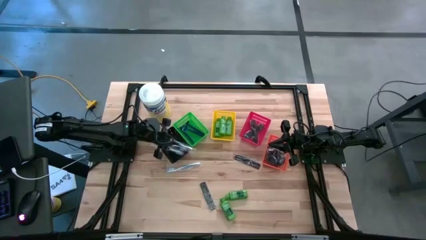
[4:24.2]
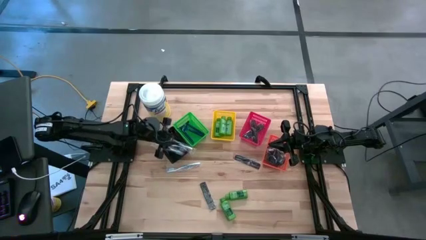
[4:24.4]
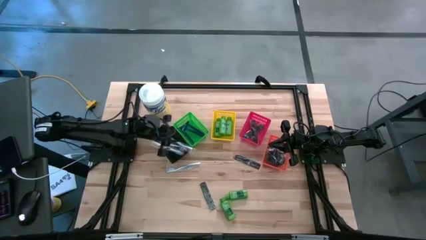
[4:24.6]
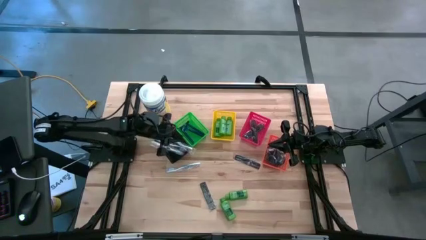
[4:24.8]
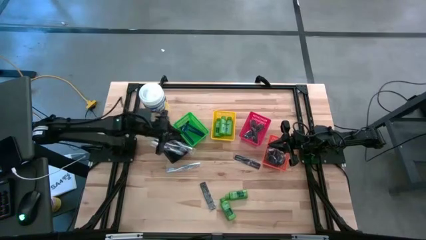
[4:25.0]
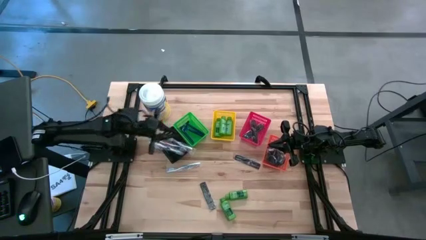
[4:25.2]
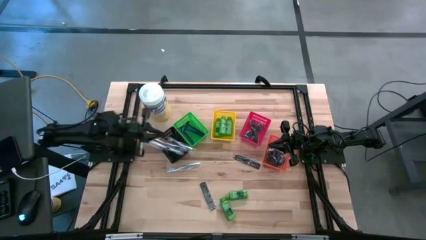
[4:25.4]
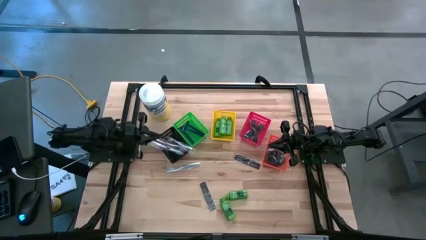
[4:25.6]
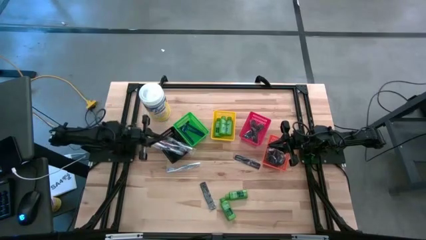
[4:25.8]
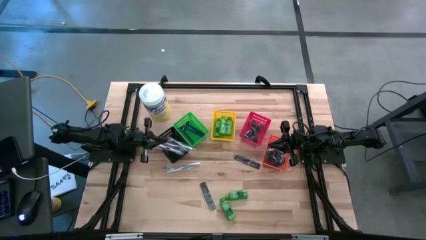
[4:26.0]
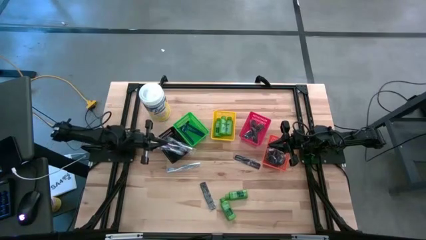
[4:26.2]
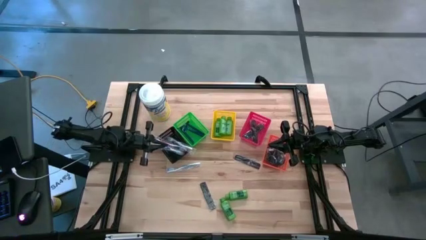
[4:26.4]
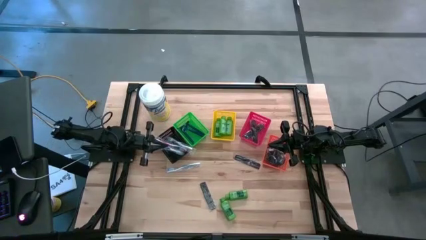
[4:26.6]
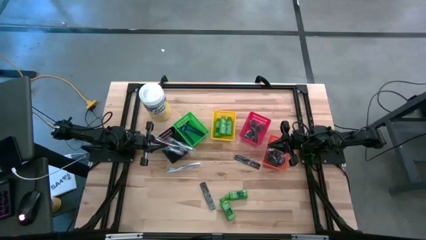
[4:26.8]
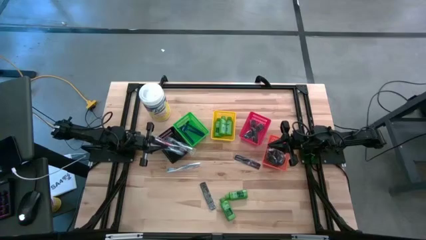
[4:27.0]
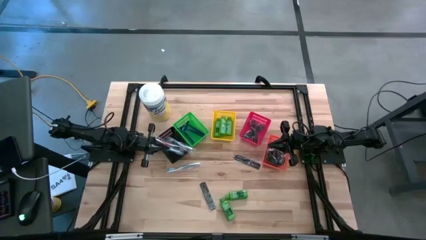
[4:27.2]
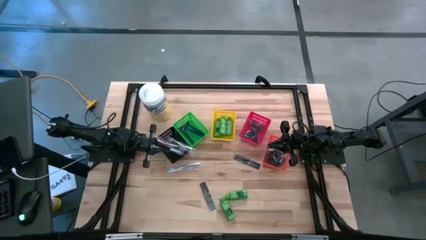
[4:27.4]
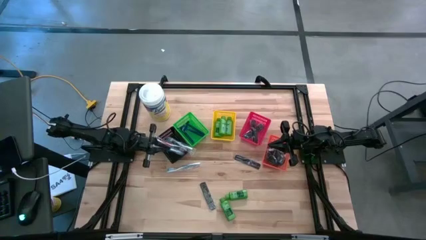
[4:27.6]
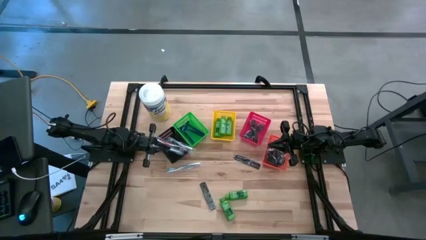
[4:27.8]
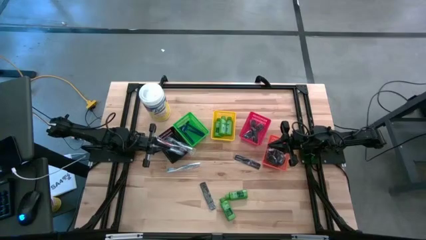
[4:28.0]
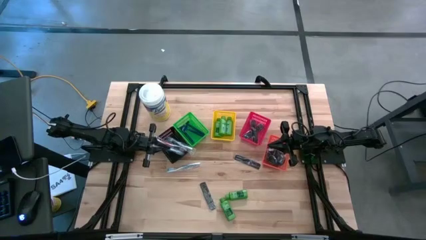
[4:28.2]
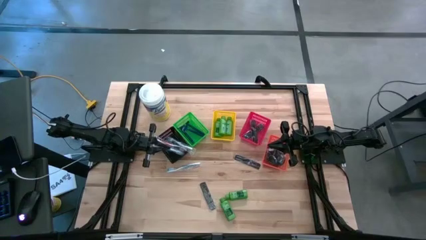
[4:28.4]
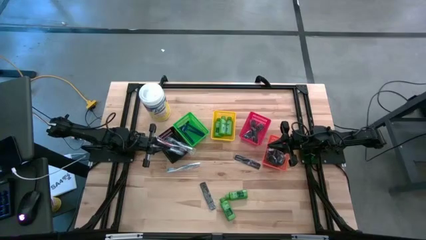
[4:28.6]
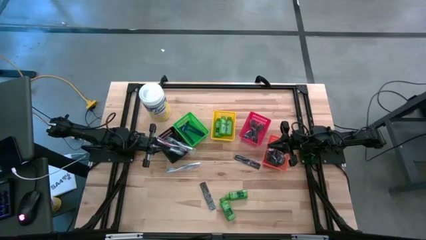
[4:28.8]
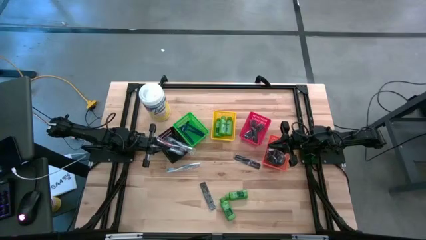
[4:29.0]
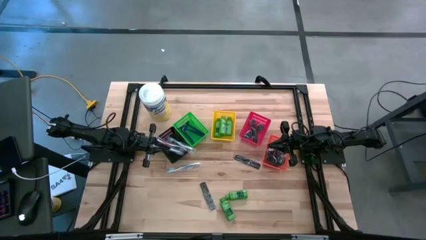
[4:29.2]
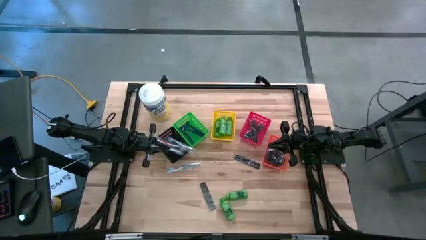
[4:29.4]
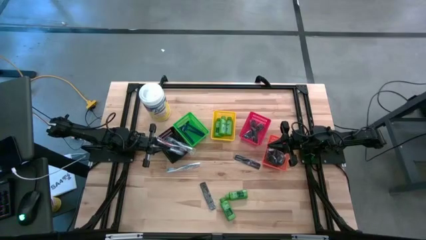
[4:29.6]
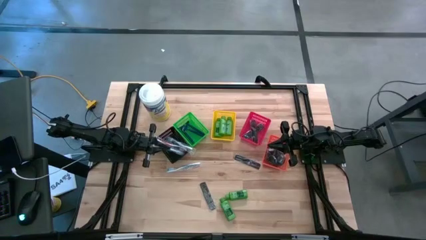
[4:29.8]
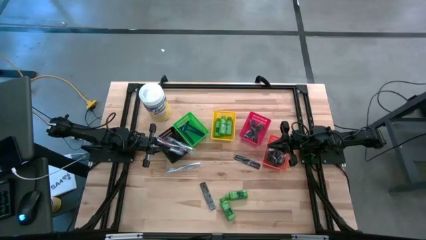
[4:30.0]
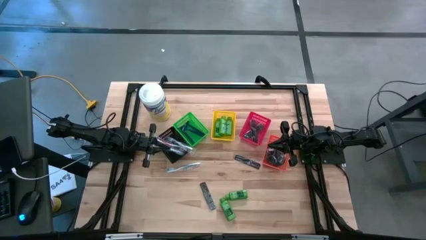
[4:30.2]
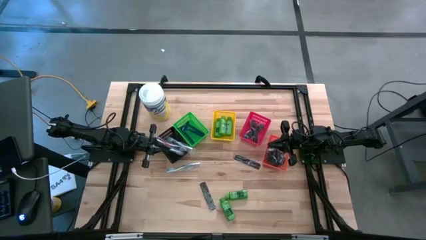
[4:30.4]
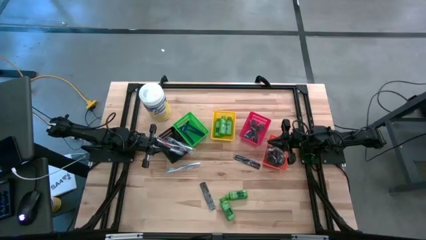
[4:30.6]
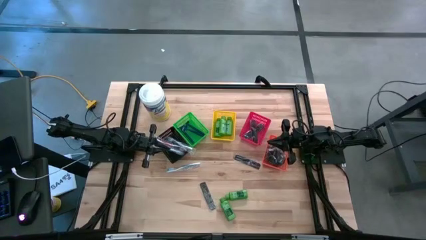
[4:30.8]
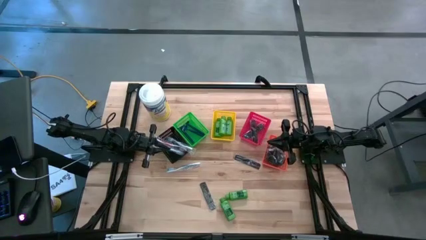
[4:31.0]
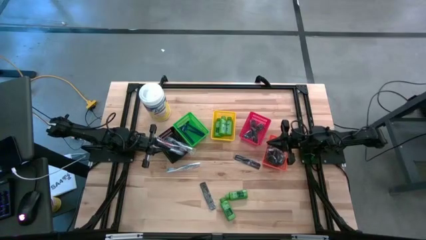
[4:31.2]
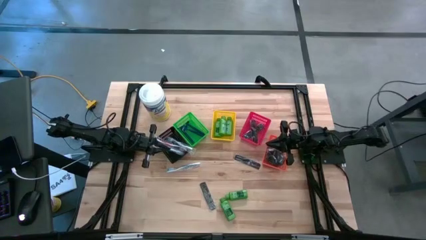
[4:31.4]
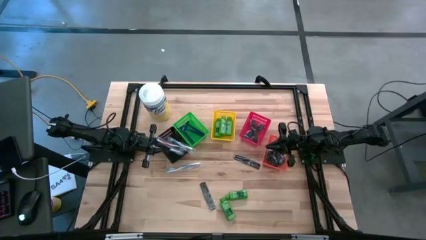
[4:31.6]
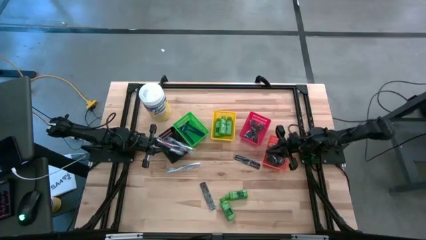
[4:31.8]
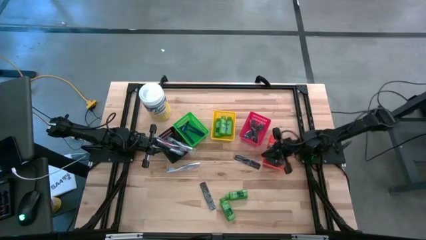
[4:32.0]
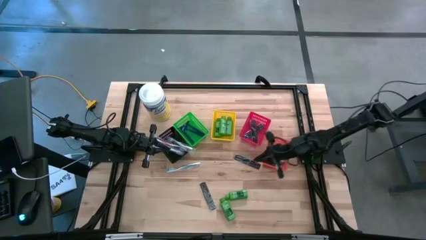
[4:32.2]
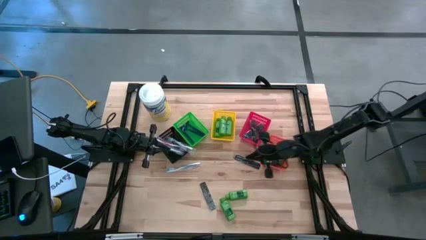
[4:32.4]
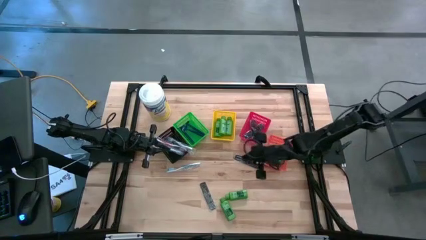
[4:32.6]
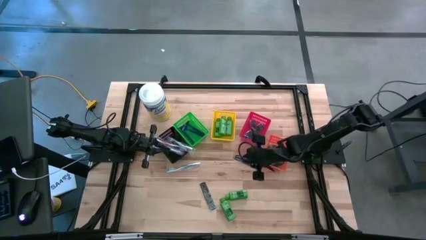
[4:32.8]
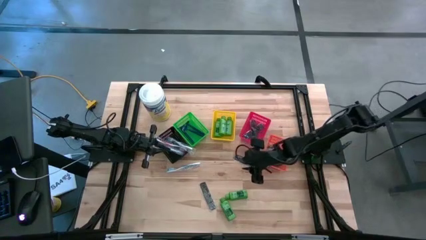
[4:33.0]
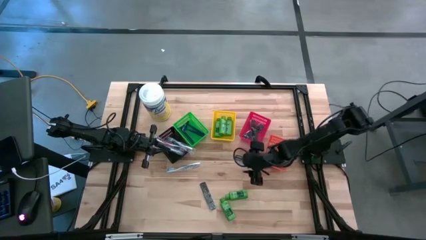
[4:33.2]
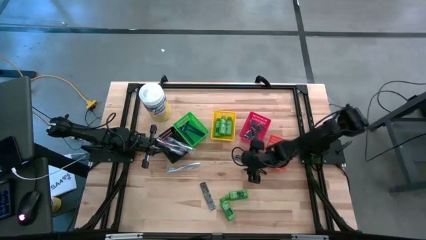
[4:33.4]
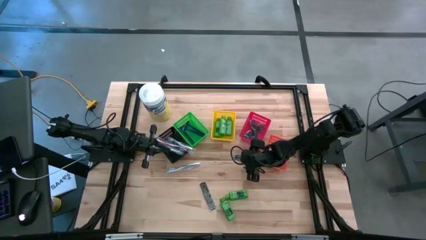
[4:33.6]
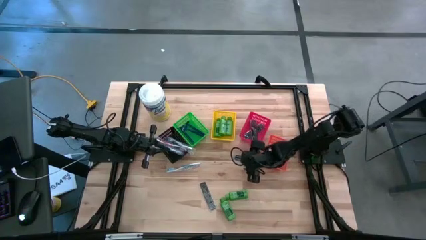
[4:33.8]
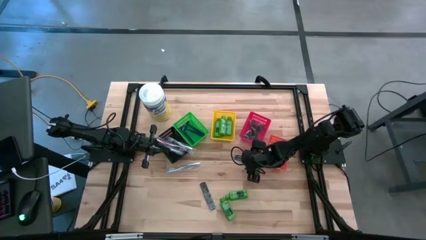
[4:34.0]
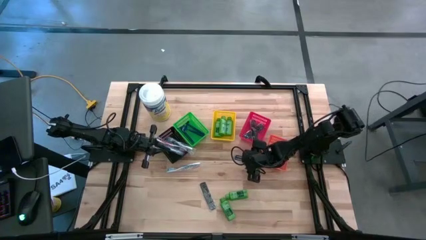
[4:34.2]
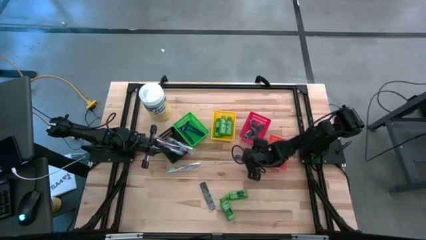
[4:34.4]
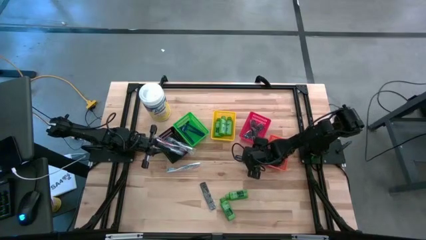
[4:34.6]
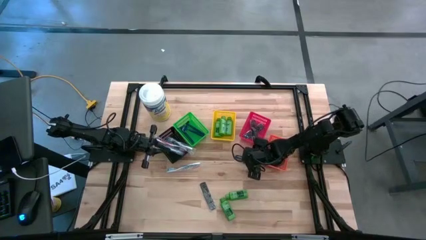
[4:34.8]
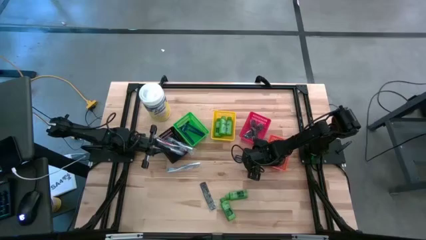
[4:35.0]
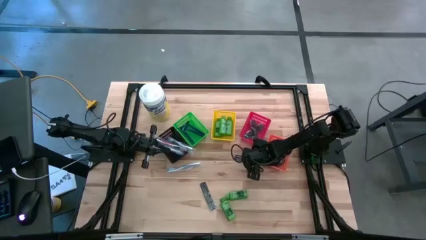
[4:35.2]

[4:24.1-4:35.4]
Task: Pick & Place Travel size toiletries
Put the top black hair comb into the red bin

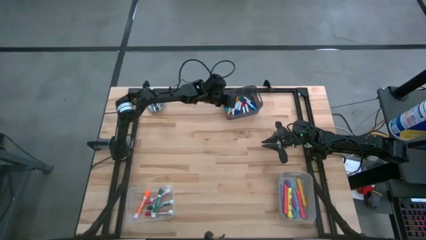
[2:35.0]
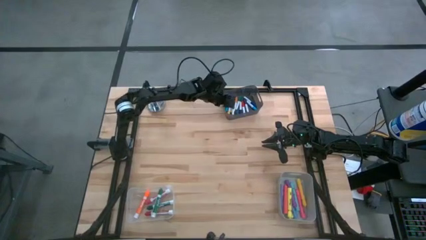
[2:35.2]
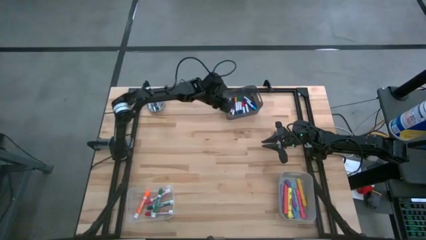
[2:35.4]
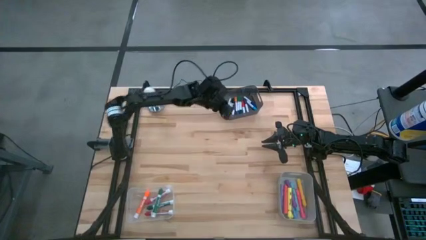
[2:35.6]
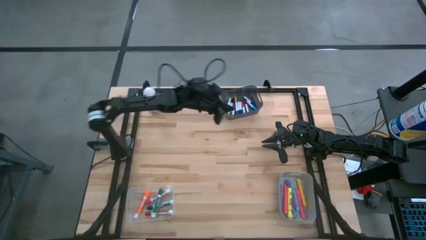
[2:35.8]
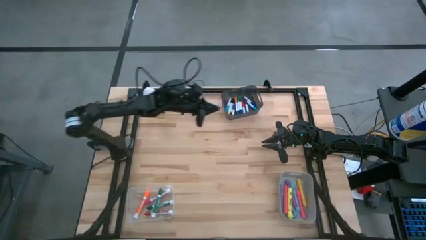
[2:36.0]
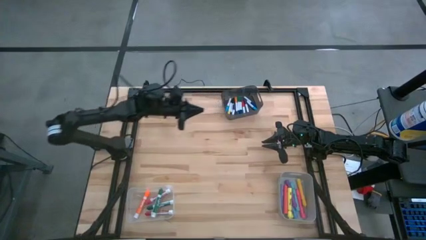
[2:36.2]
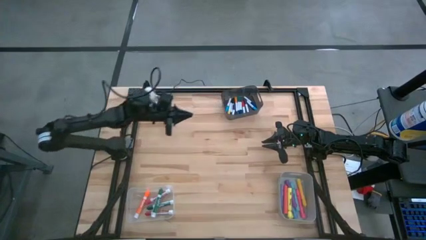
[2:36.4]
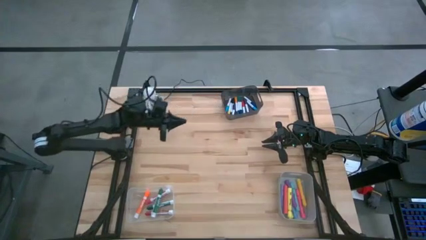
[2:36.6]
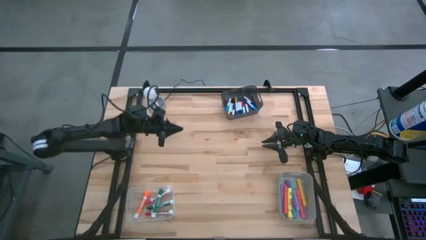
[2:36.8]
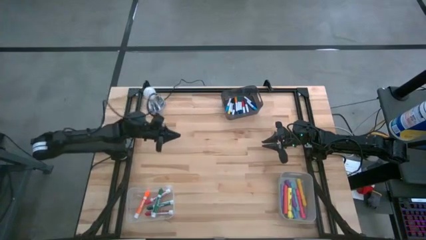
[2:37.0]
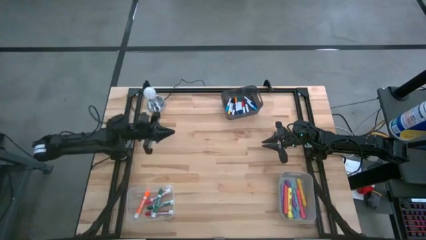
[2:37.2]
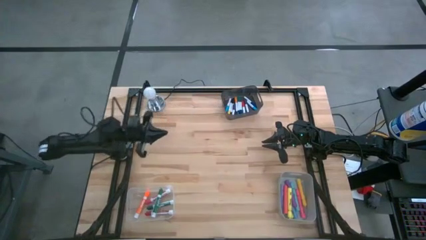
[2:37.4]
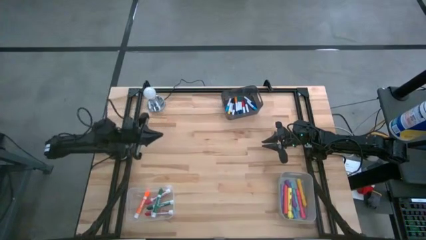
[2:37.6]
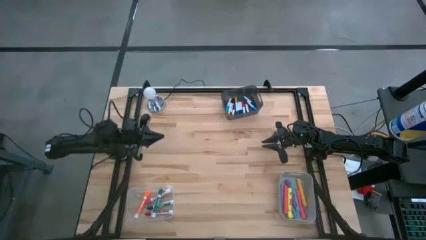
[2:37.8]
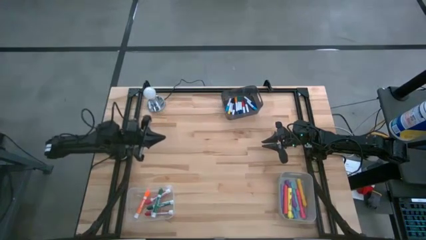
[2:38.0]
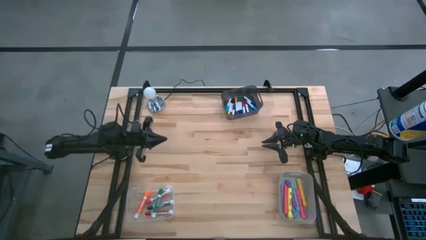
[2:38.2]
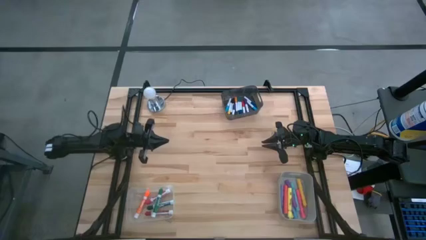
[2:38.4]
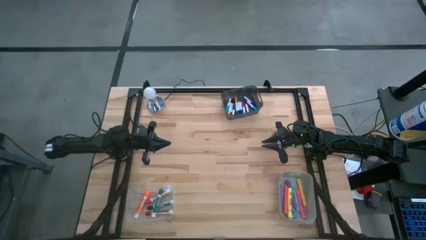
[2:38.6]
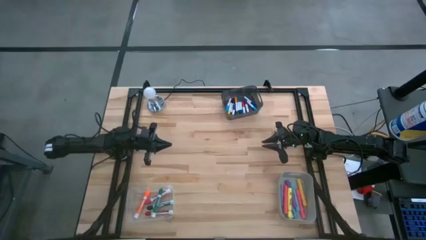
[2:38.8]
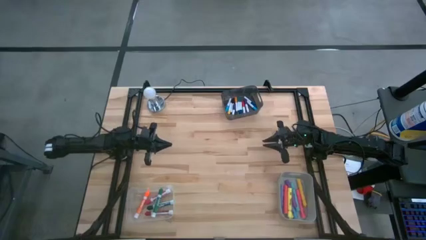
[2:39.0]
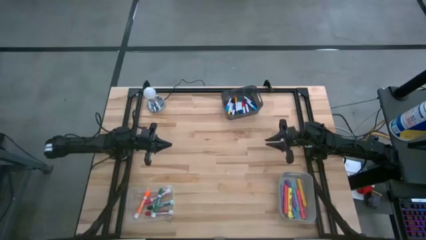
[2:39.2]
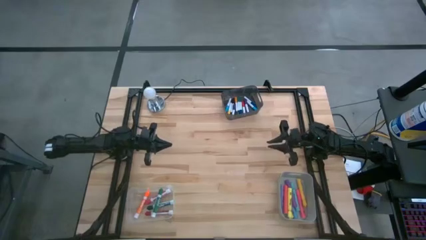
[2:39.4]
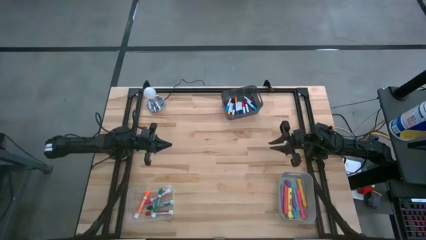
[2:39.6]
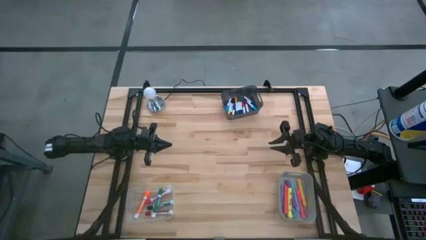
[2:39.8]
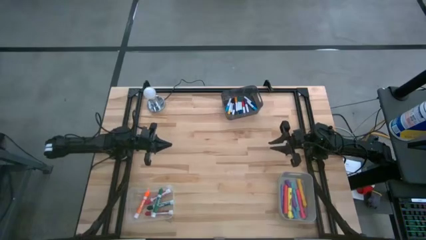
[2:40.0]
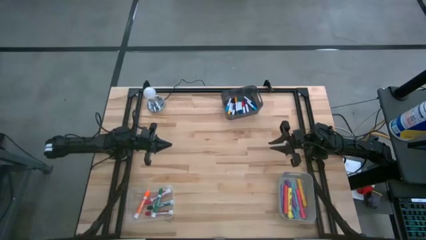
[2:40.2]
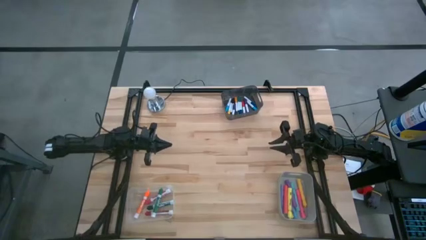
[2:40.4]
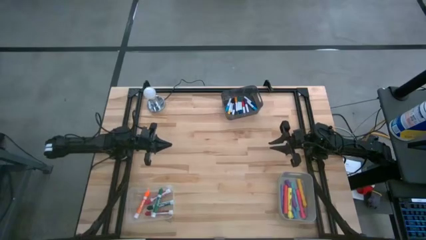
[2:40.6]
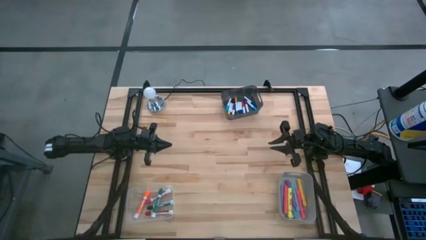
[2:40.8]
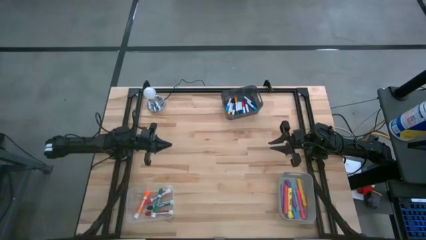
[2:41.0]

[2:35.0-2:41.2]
Task: Pick & Place Markers
Return to Home Position
